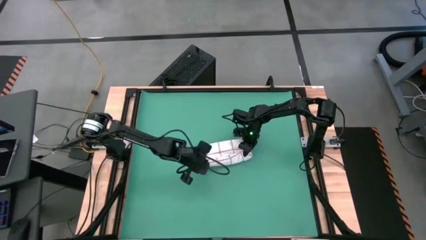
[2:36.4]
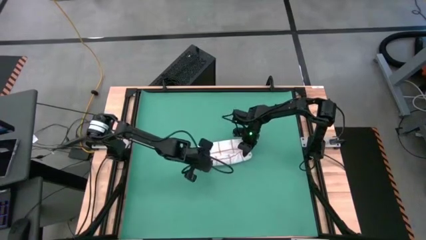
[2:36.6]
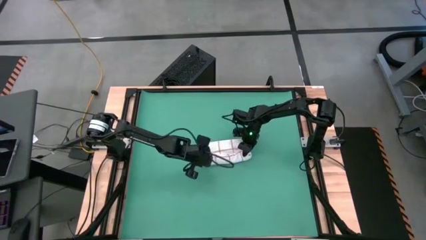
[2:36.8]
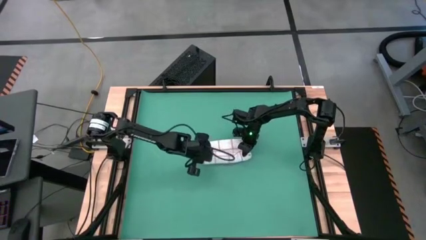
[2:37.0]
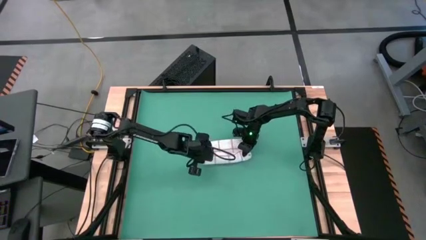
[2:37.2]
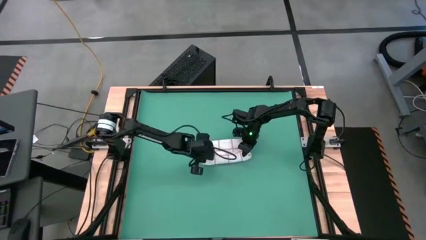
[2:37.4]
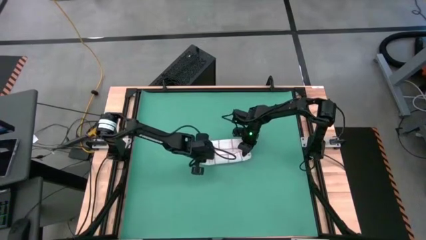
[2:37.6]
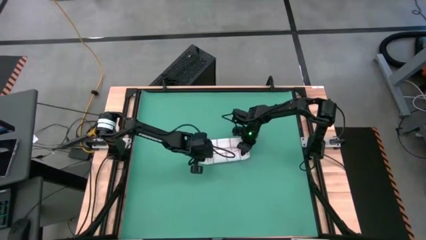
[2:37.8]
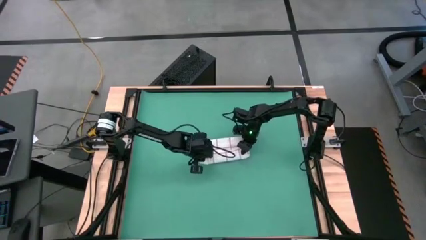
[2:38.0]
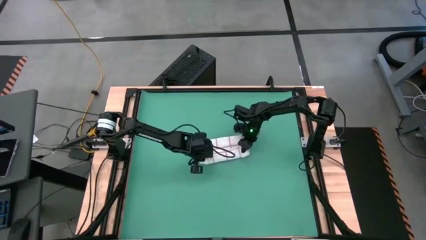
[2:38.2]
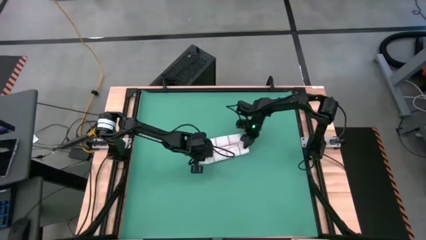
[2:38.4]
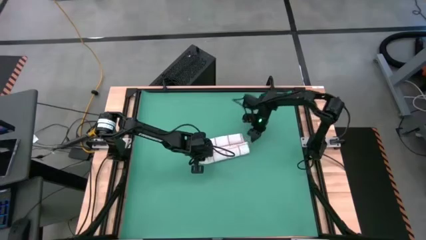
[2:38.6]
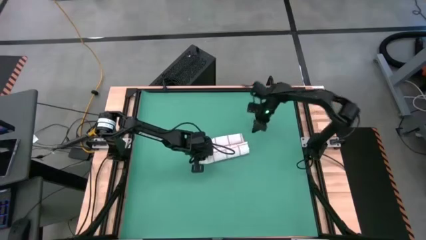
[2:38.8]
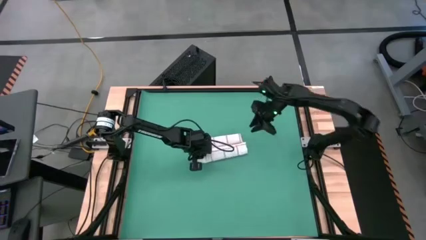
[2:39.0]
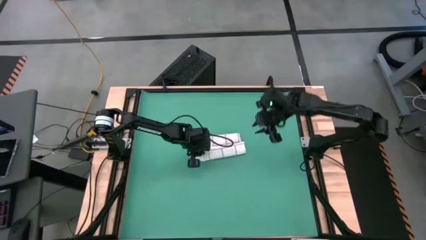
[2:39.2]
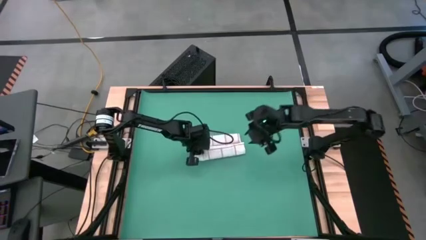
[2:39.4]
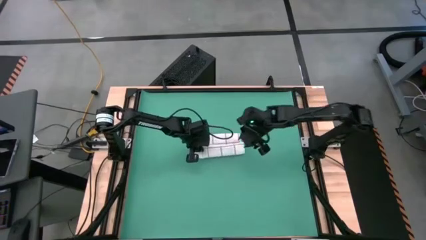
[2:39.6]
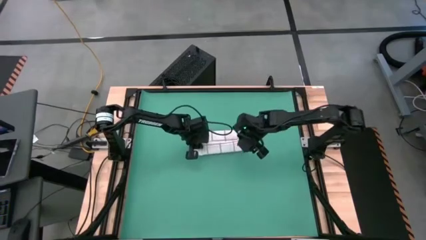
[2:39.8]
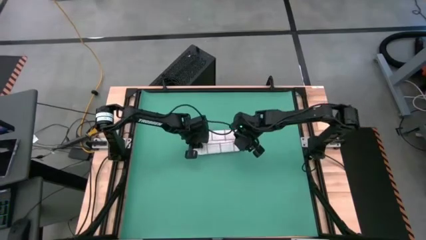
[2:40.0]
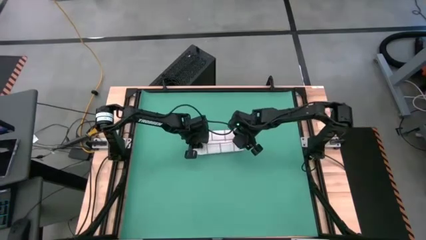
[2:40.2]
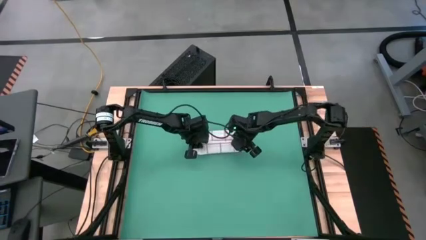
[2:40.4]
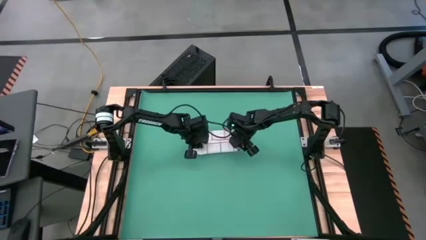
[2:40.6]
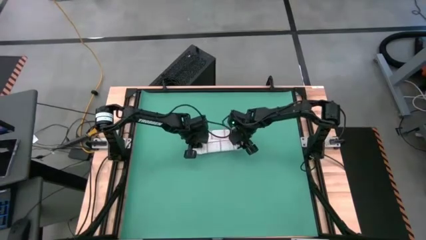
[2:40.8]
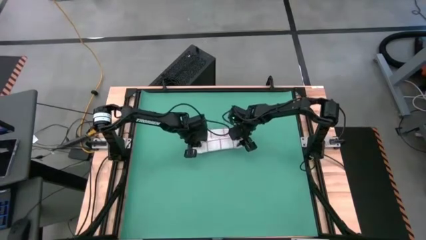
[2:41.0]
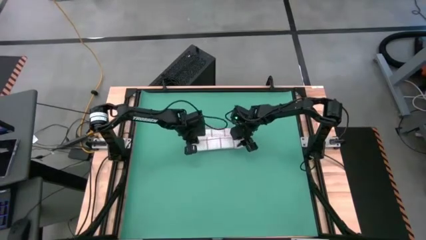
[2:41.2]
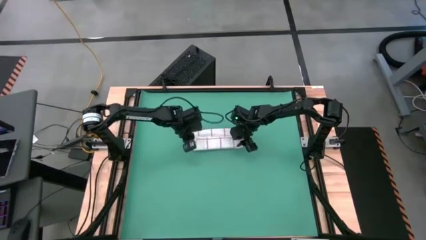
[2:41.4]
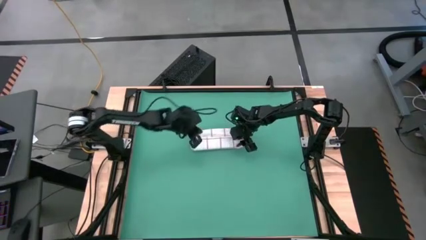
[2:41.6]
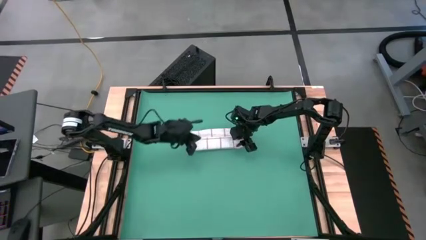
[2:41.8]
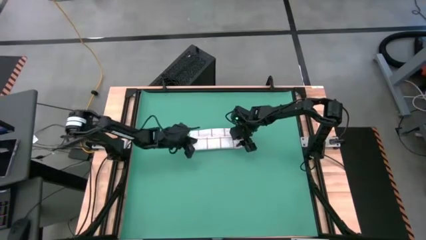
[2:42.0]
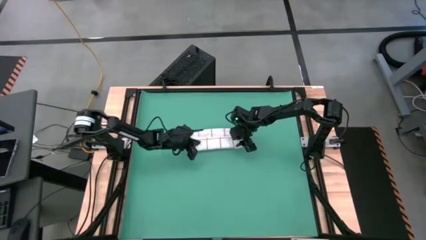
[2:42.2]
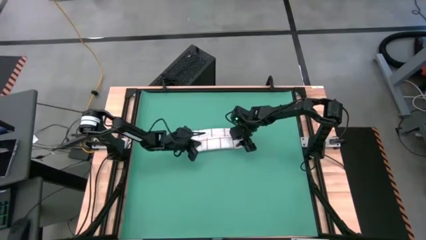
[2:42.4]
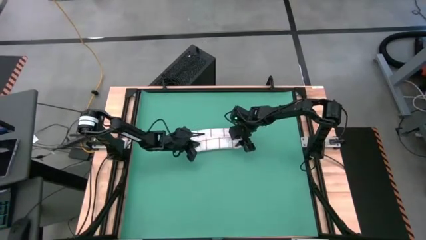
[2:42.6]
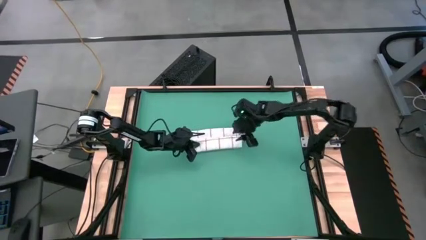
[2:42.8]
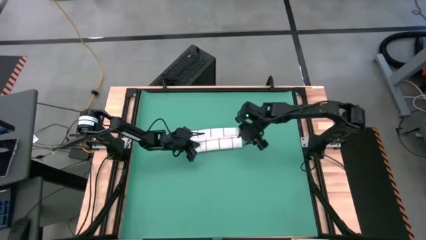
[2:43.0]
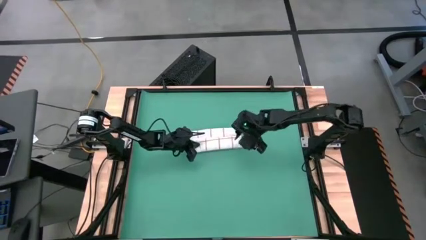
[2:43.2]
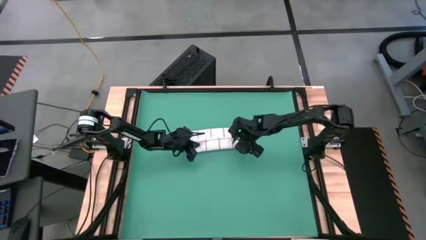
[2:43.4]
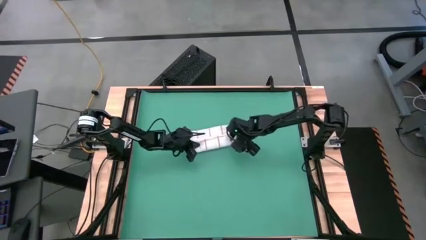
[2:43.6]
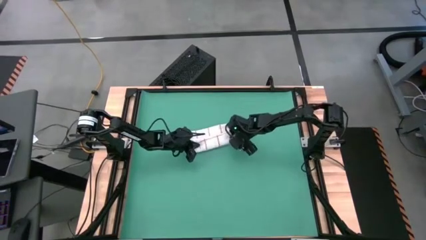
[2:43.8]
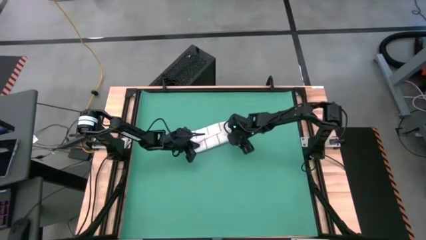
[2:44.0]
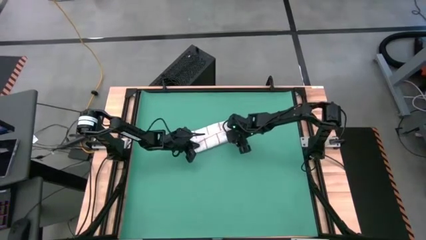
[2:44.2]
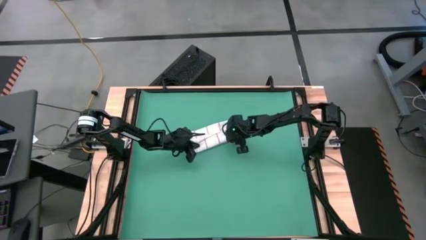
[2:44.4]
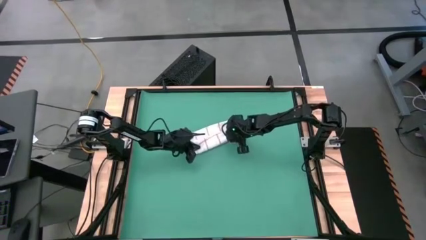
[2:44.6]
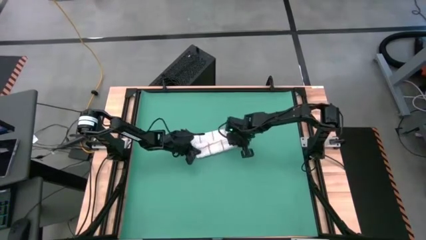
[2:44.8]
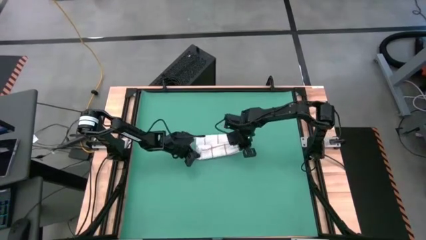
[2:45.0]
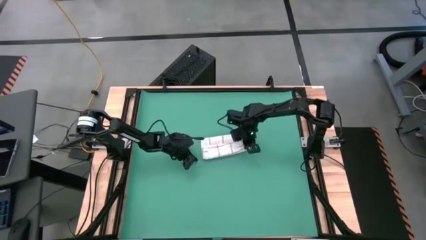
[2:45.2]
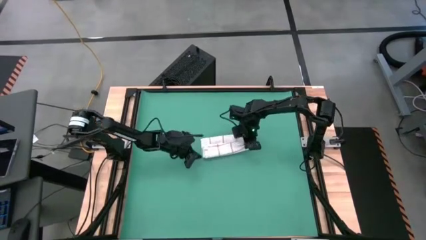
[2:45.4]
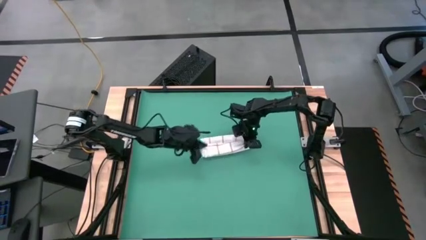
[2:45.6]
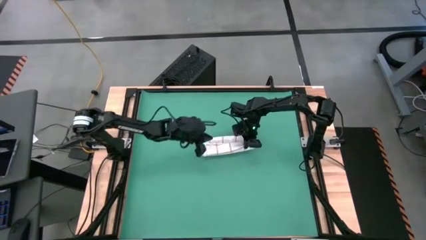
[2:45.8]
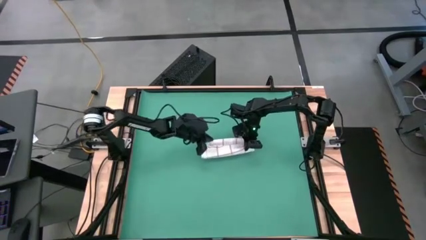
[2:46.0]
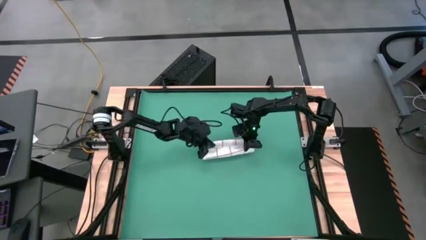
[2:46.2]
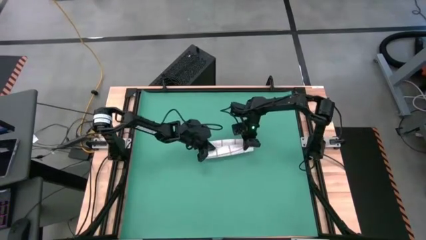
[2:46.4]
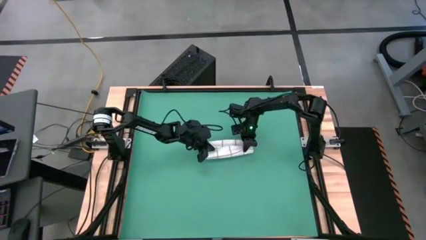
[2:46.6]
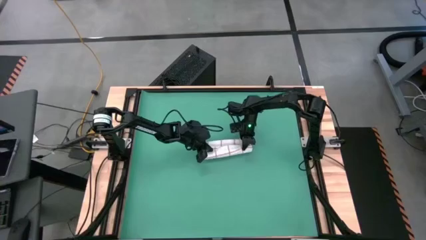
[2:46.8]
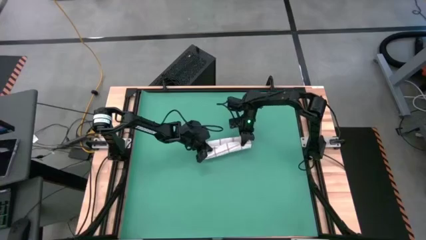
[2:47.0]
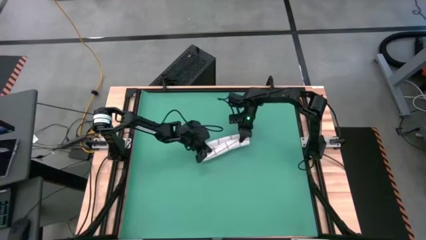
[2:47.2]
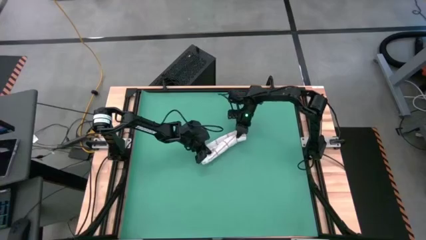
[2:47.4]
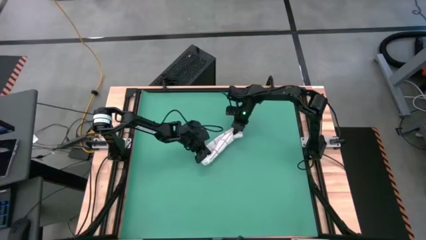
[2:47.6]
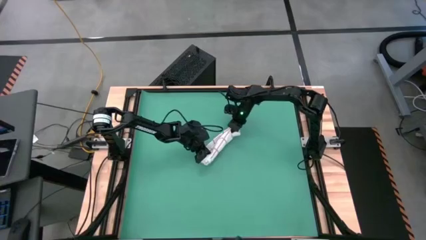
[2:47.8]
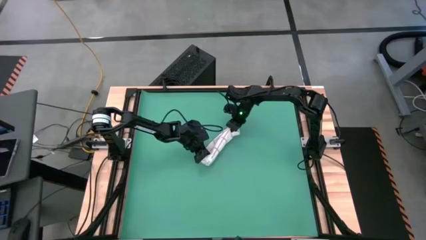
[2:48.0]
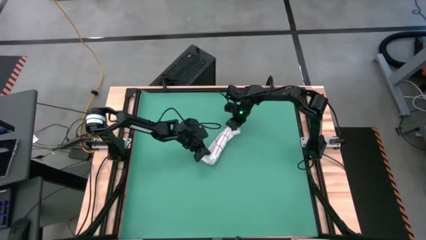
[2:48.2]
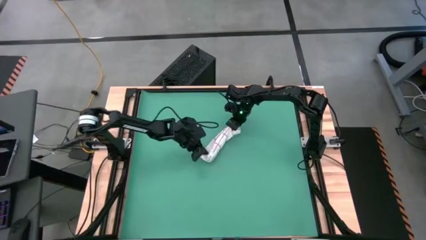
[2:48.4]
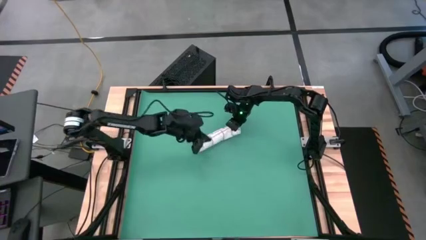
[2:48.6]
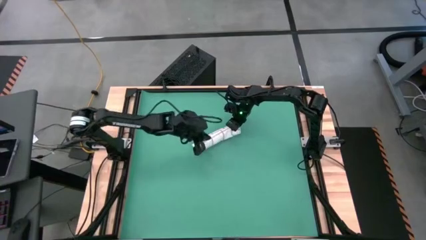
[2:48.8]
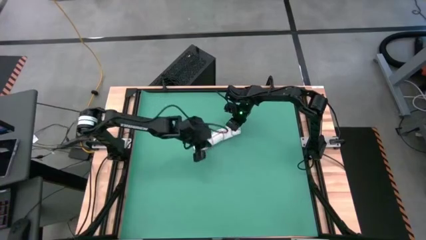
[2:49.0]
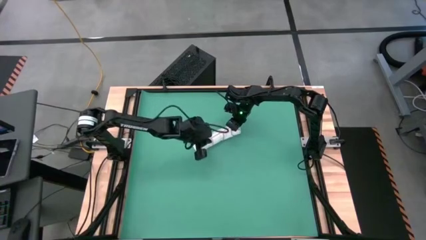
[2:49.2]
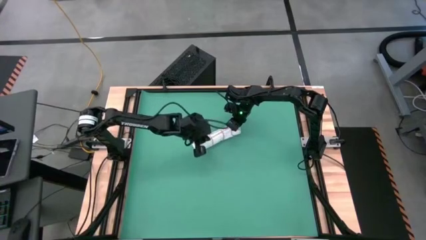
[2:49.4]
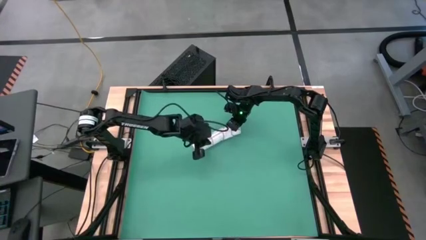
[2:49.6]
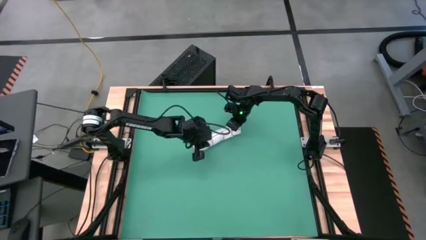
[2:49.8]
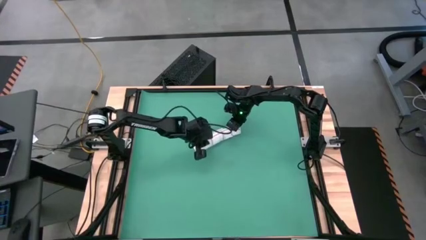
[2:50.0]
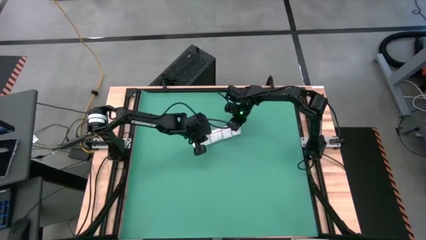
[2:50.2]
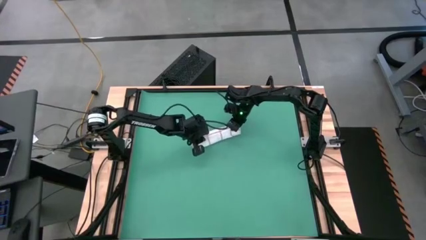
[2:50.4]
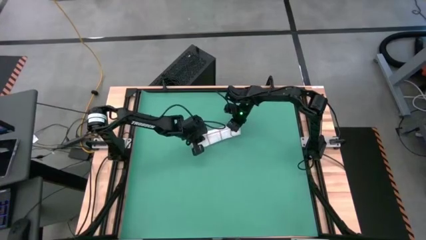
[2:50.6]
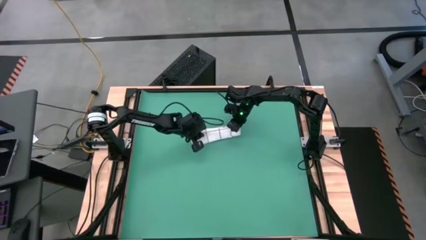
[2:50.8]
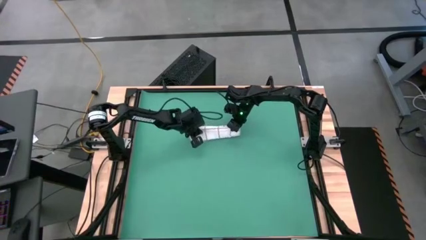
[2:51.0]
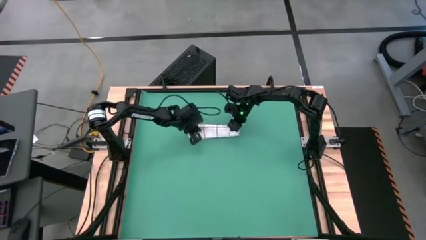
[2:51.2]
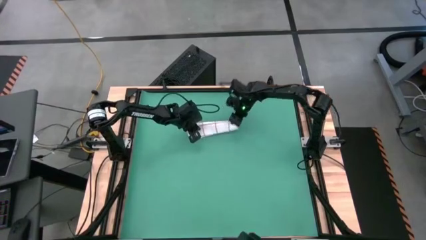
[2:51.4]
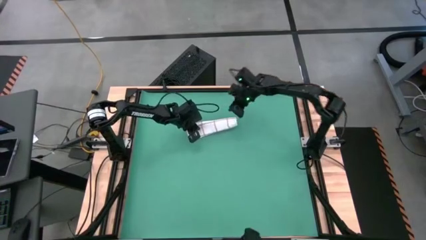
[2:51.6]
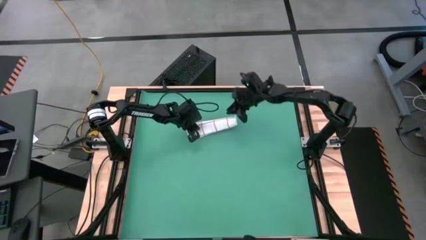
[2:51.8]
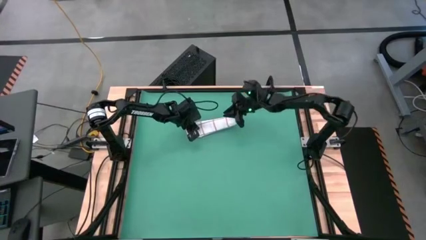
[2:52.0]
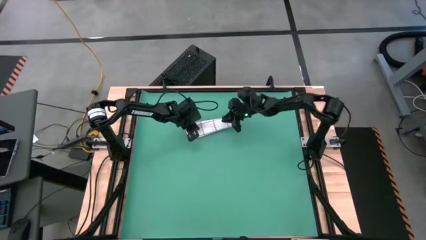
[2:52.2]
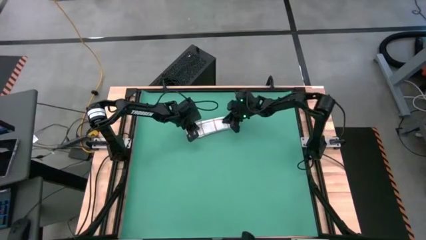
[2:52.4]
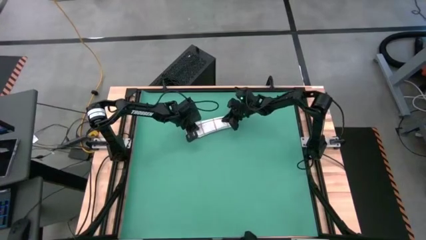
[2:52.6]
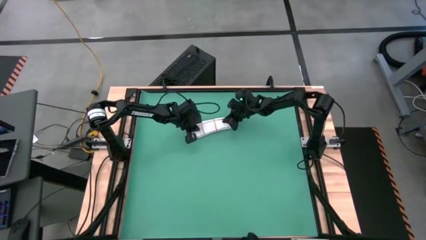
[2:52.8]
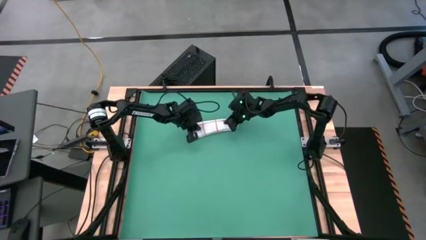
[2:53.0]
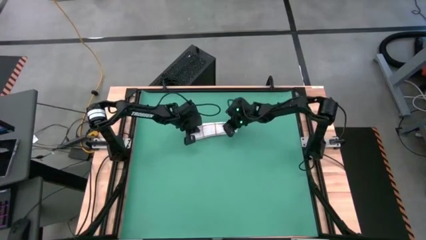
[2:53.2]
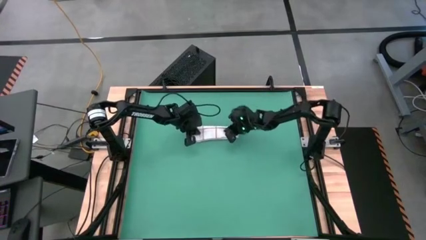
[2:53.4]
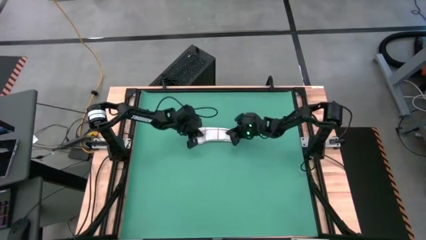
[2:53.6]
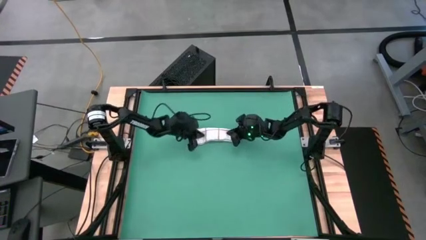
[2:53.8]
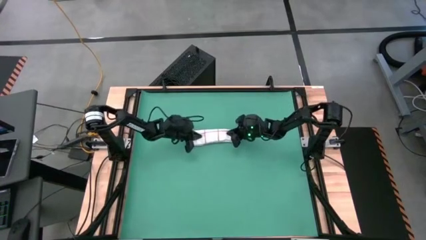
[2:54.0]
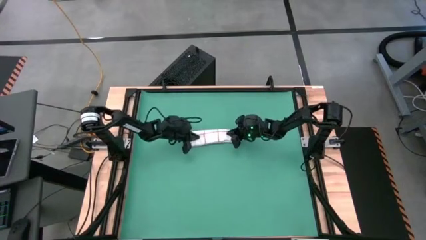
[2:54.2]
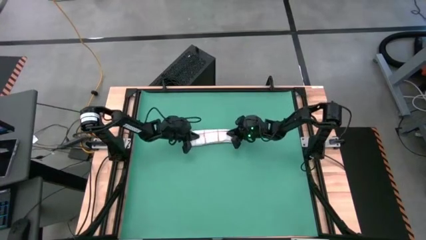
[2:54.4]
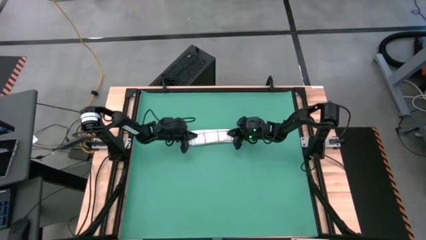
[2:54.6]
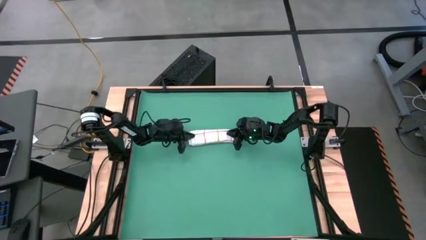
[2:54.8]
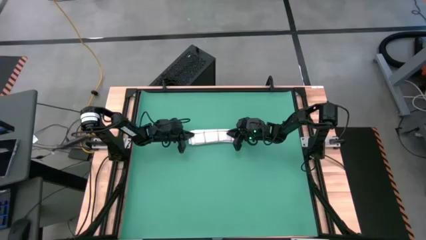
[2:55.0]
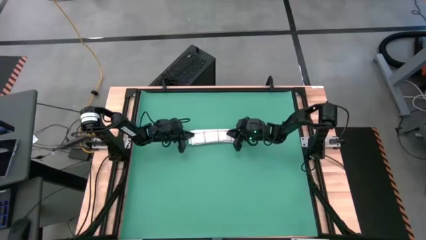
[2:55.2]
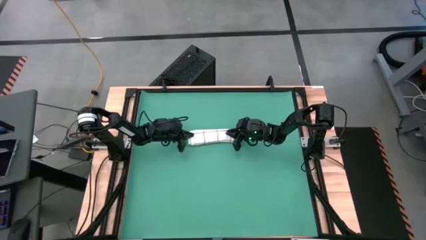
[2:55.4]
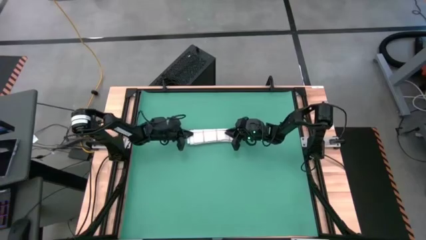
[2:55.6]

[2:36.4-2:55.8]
Task: Roll towel into tight, uniform cylinder
Roll the white towel
